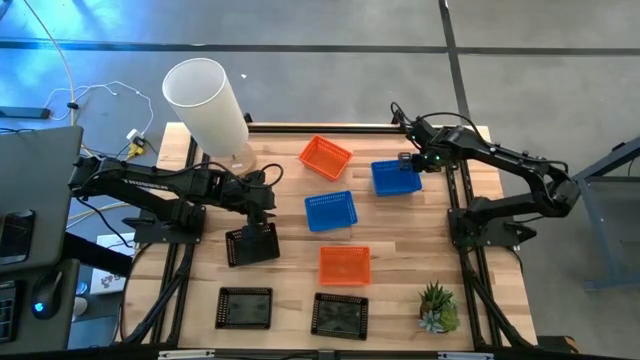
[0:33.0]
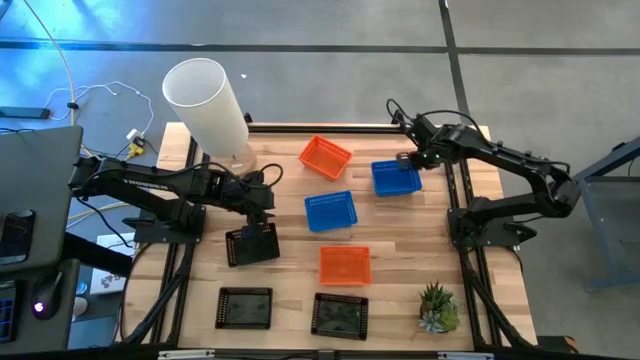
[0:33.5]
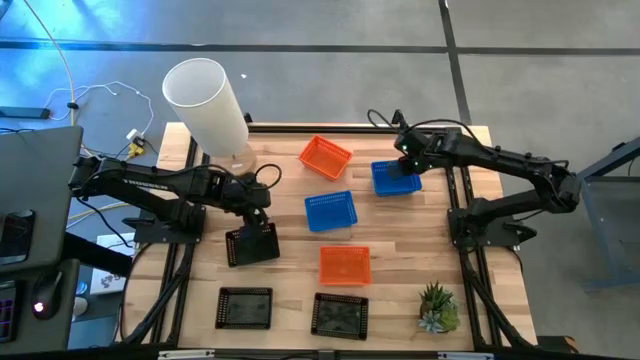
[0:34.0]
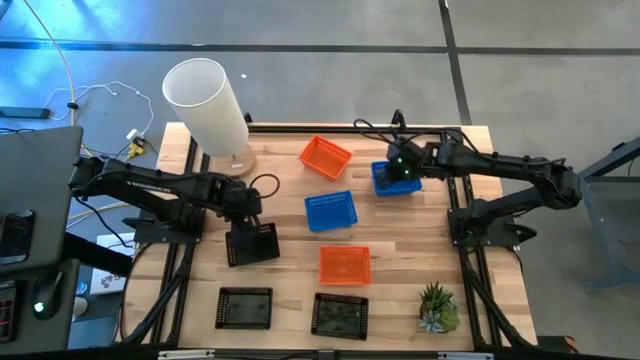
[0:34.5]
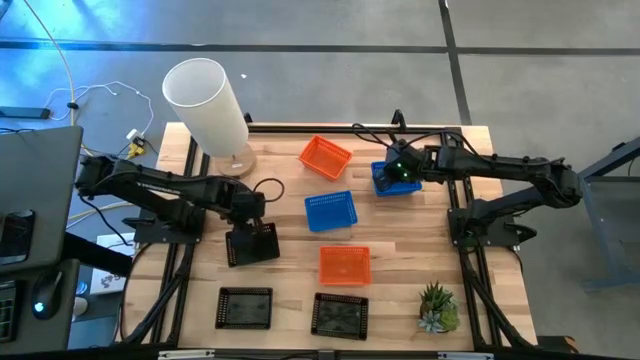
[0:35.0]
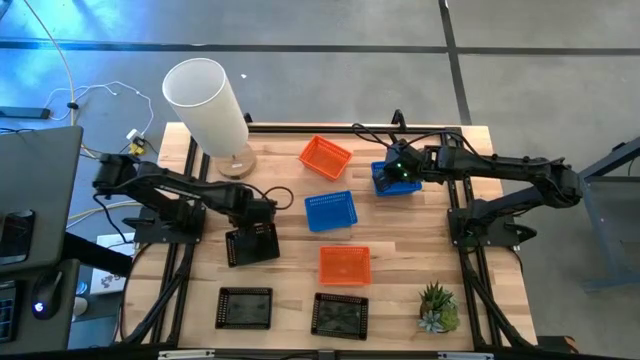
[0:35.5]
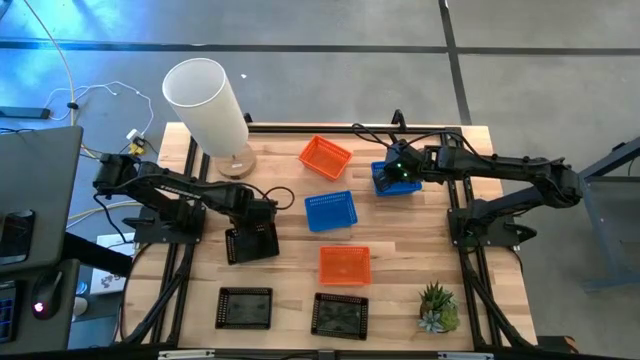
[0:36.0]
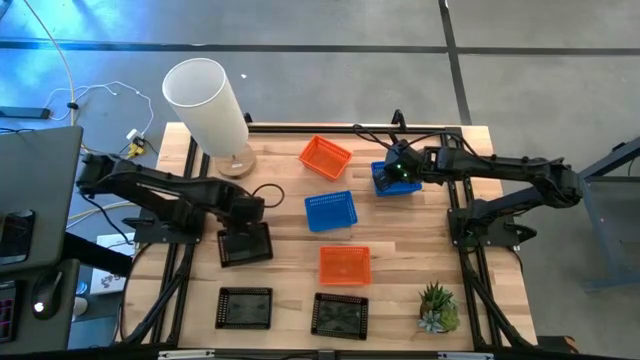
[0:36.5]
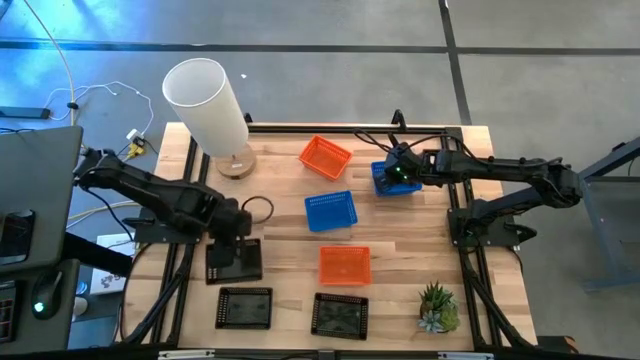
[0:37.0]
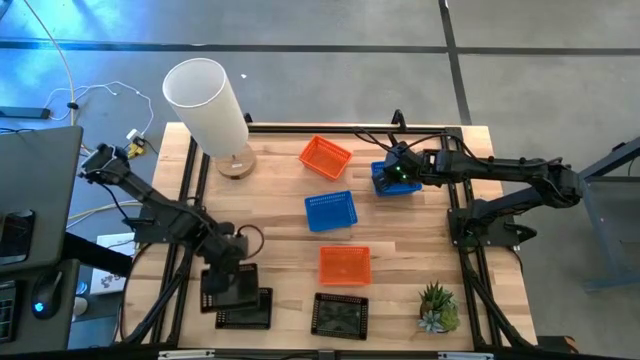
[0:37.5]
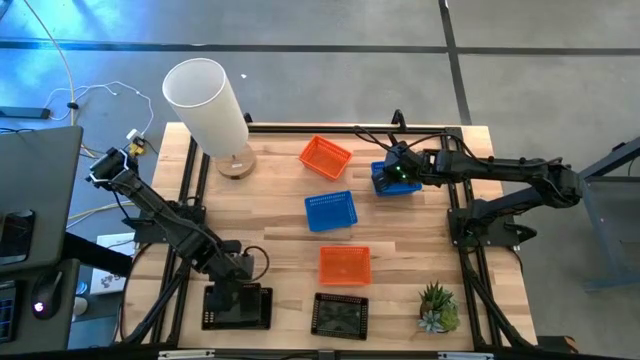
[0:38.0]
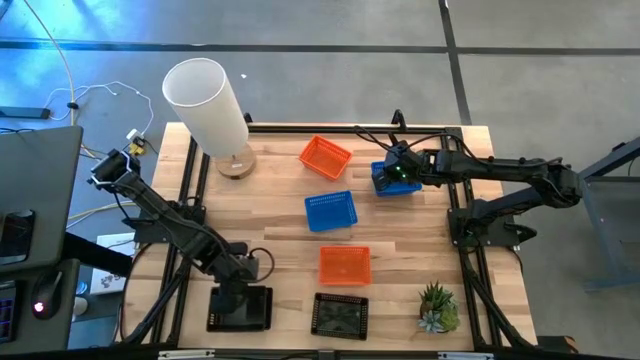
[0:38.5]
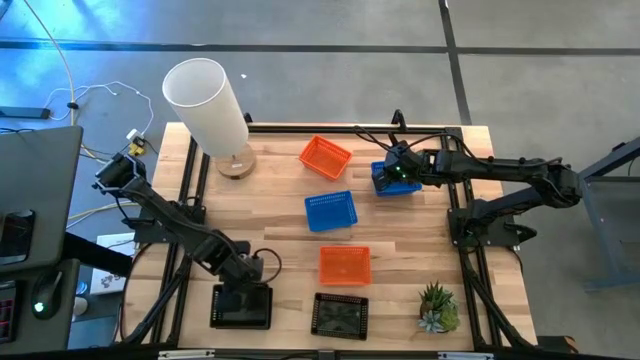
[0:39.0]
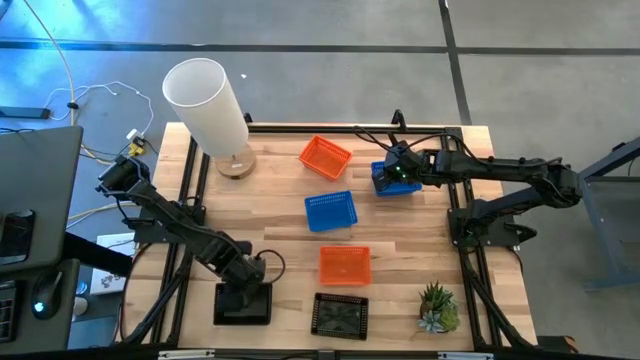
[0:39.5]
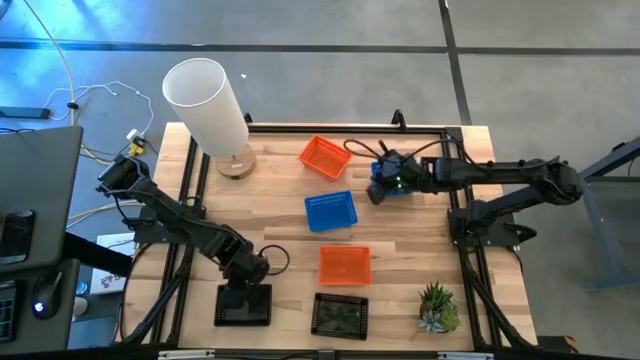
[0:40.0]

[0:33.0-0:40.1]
Stack the top black bin on top of the bottom left black bin

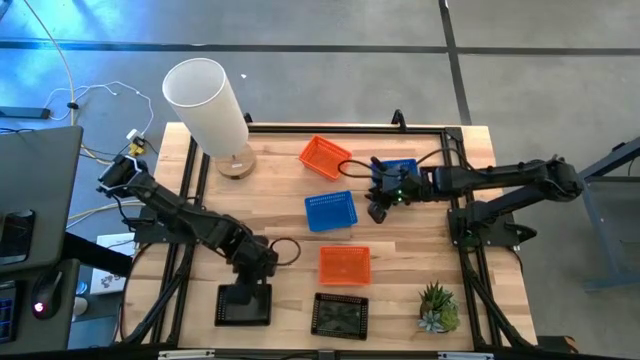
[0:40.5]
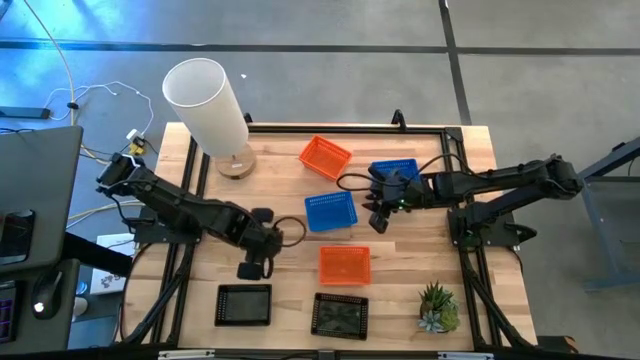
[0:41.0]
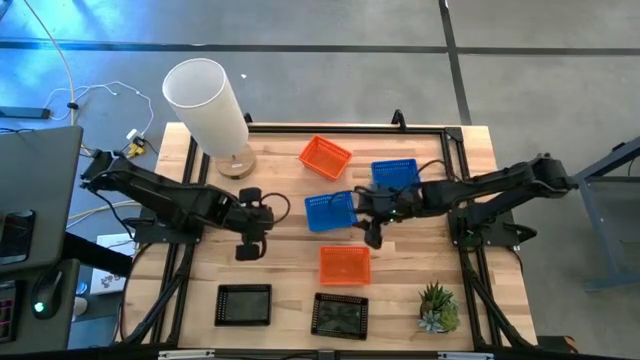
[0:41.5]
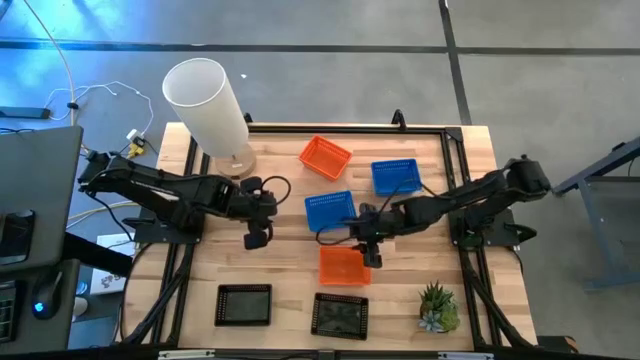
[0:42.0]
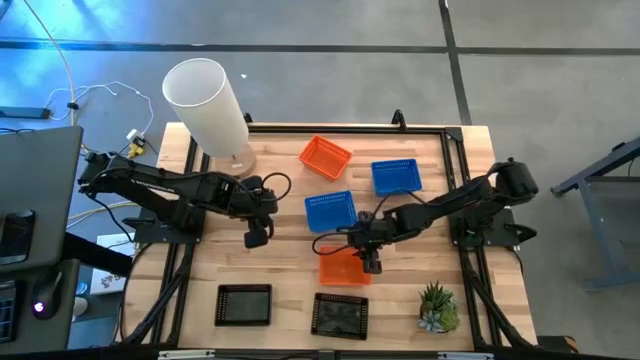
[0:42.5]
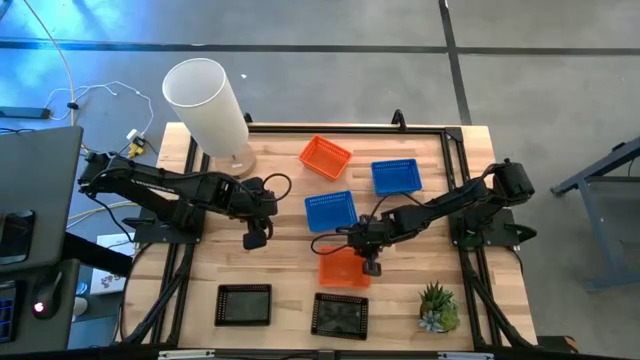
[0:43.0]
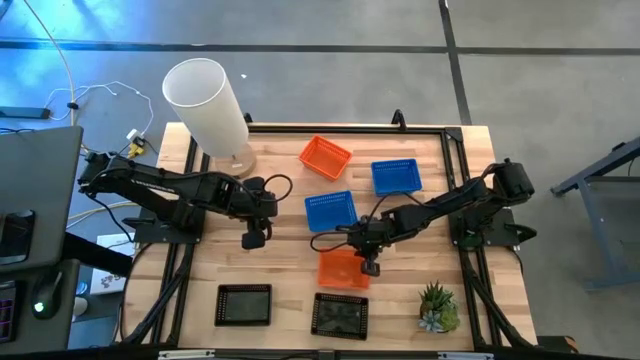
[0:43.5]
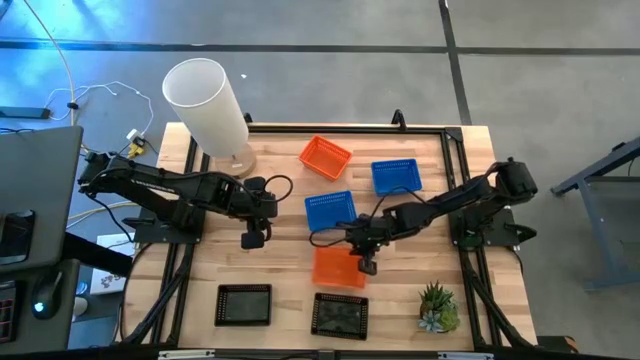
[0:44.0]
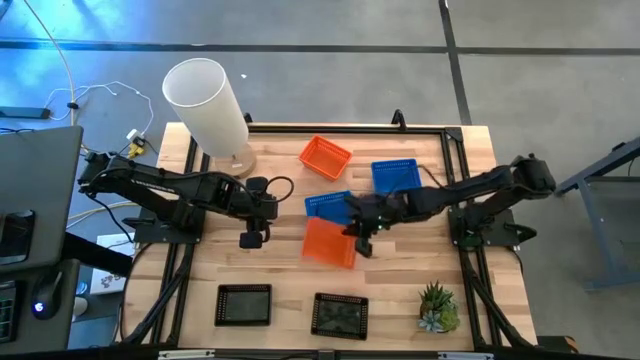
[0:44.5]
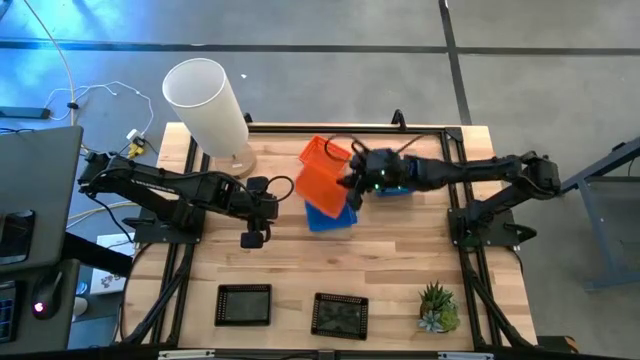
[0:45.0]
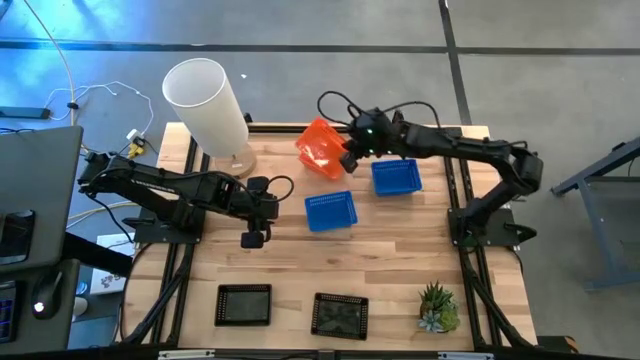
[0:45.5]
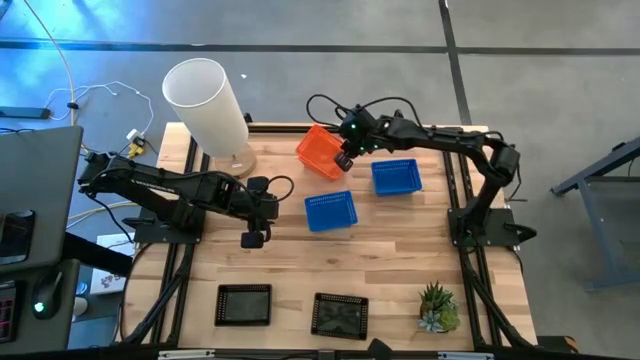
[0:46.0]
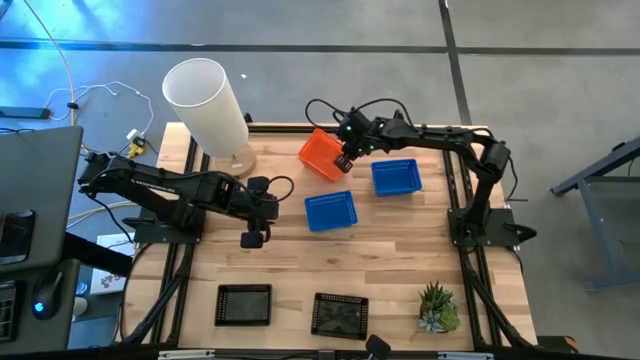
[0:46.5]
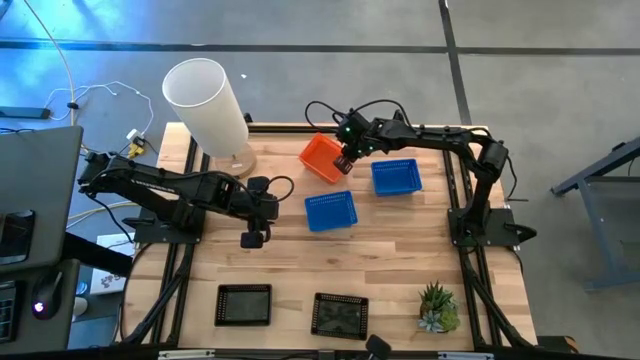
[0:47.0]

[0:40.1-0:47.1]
Stack the bottom orange bin on top of the top orange bin
